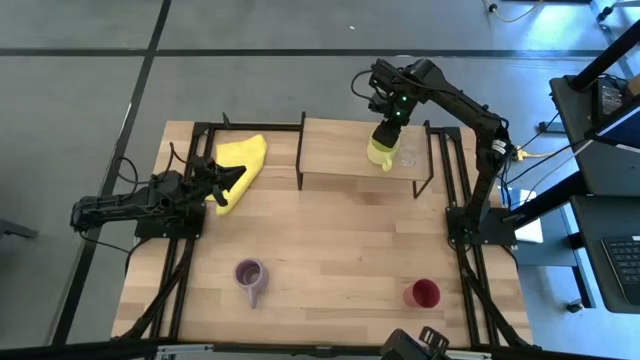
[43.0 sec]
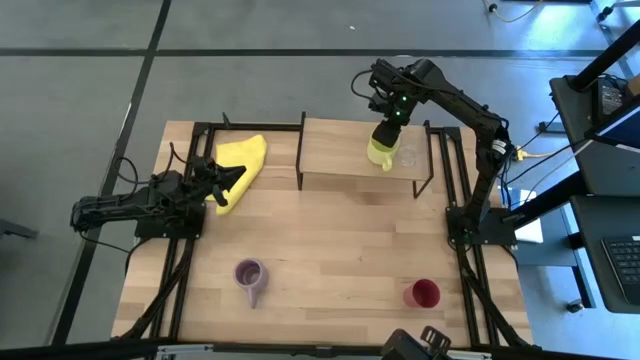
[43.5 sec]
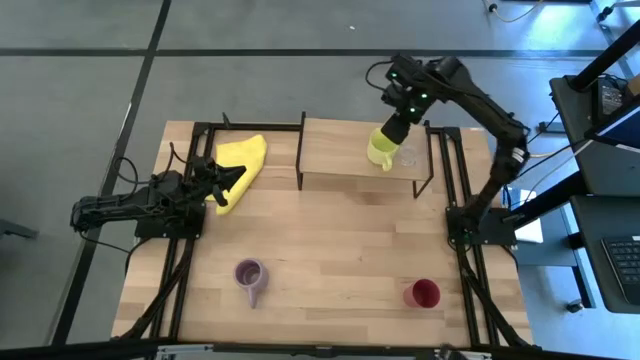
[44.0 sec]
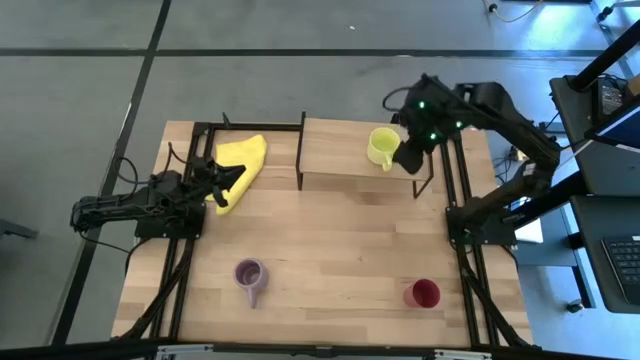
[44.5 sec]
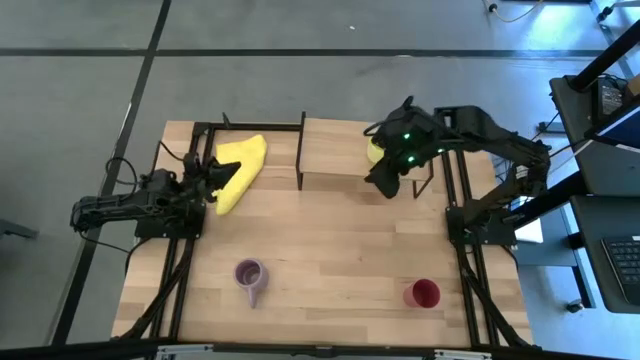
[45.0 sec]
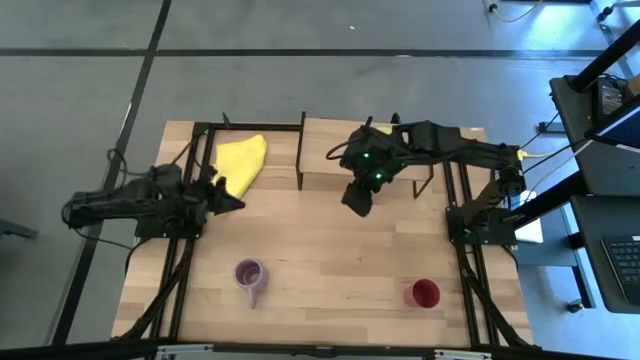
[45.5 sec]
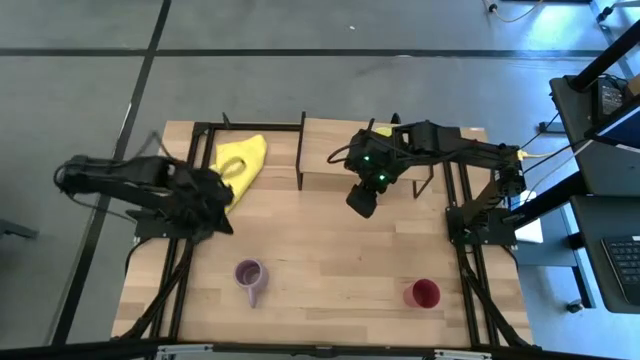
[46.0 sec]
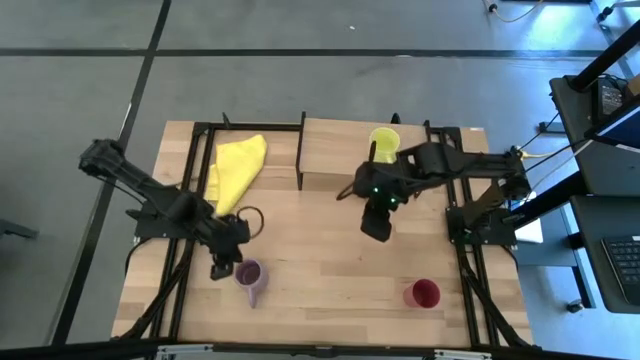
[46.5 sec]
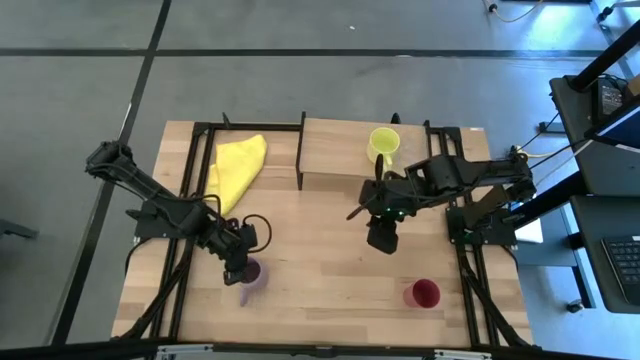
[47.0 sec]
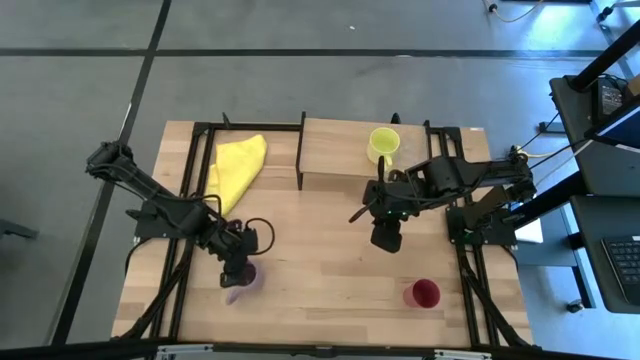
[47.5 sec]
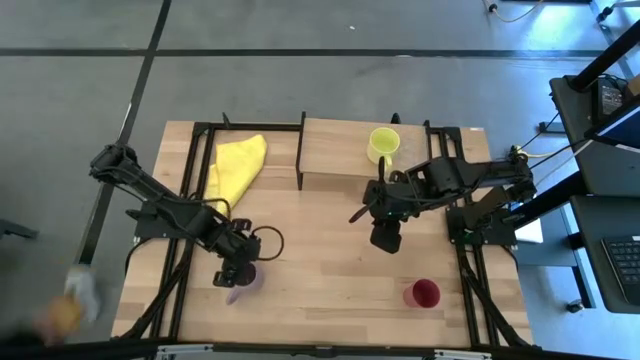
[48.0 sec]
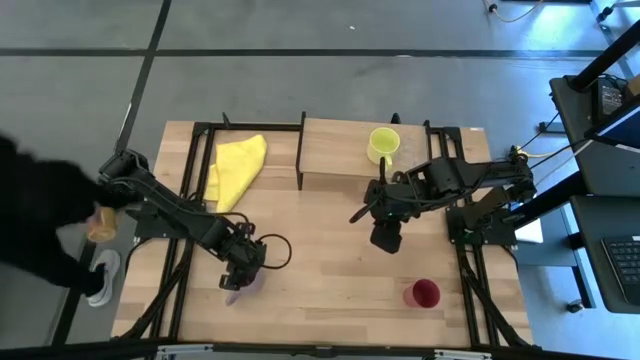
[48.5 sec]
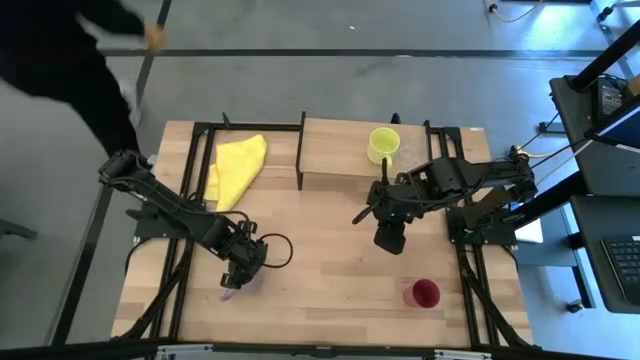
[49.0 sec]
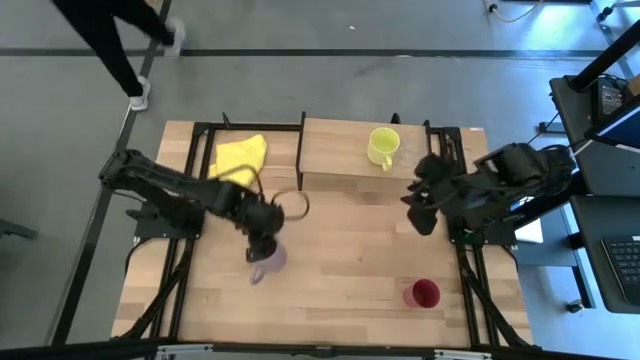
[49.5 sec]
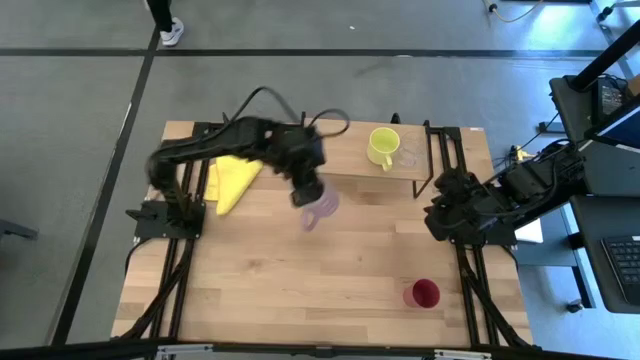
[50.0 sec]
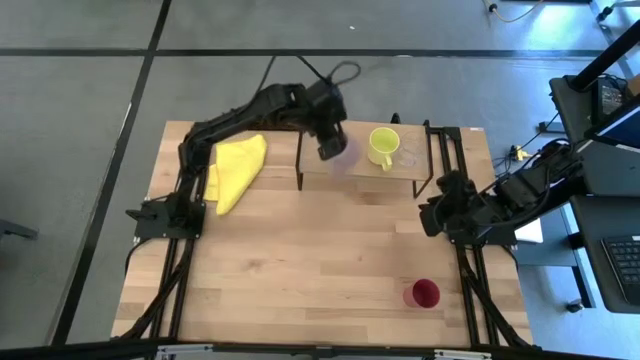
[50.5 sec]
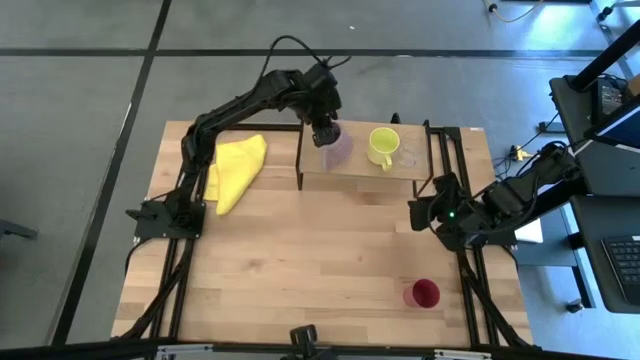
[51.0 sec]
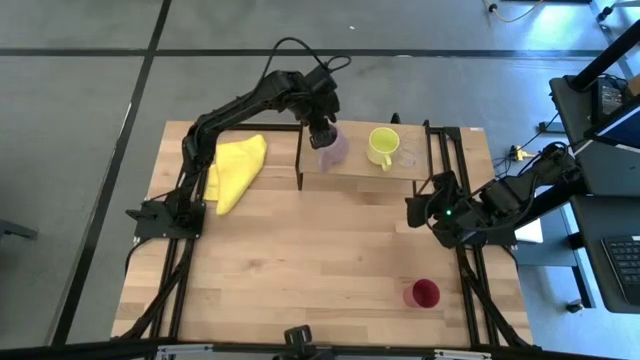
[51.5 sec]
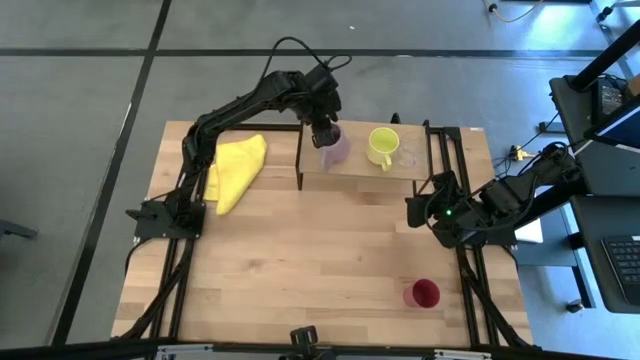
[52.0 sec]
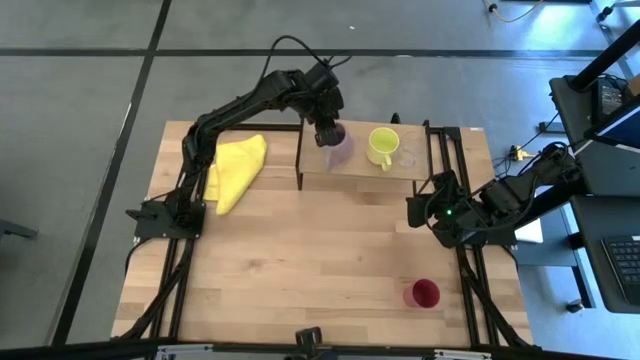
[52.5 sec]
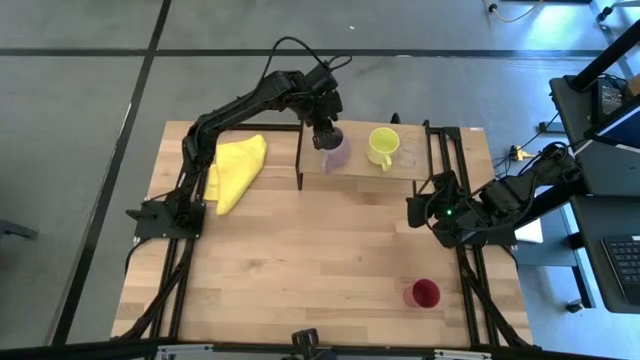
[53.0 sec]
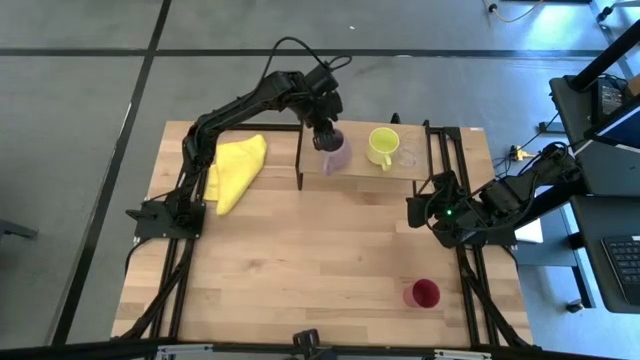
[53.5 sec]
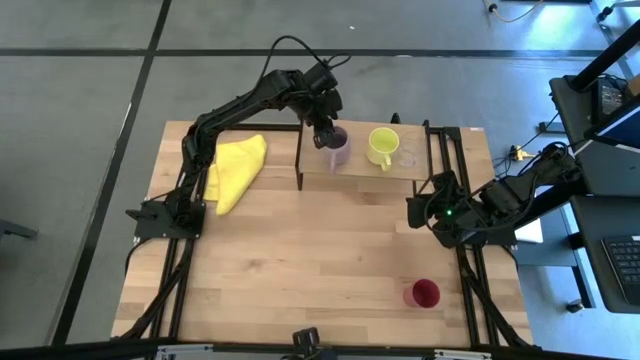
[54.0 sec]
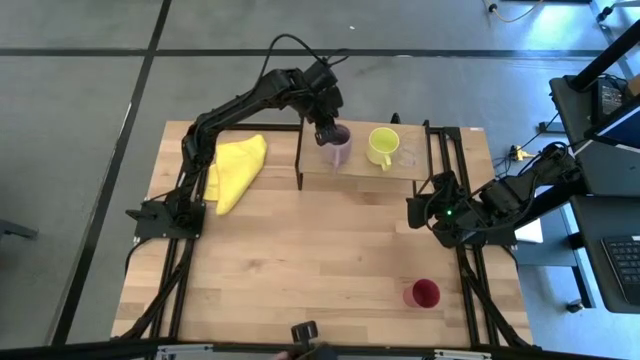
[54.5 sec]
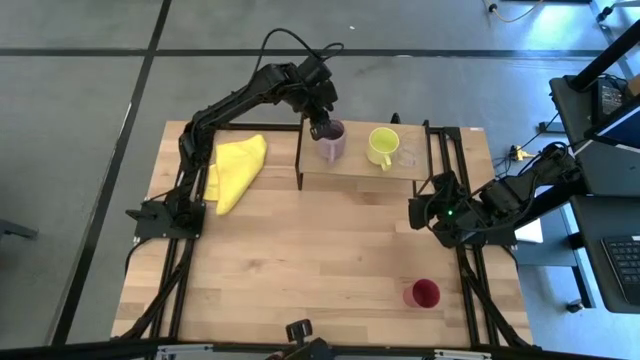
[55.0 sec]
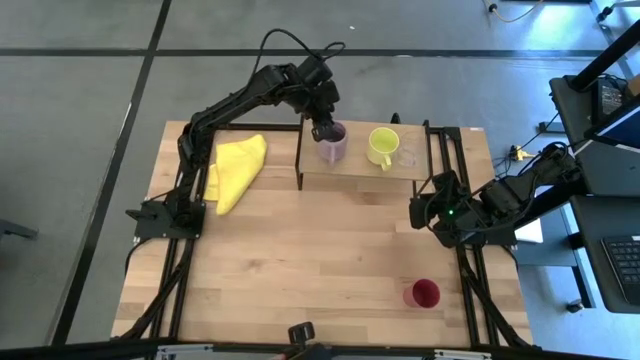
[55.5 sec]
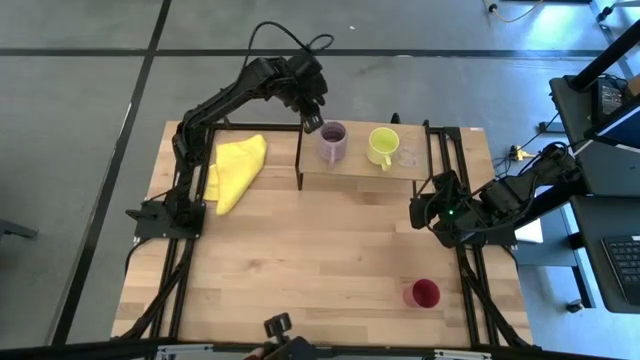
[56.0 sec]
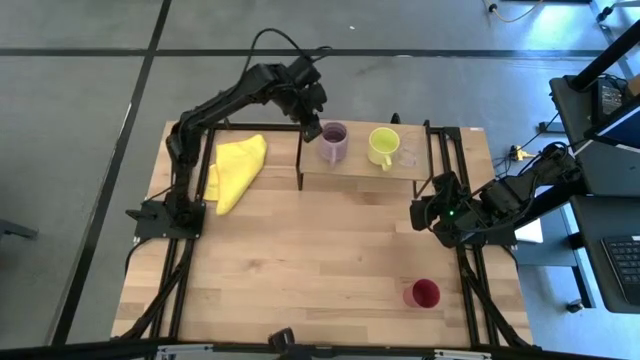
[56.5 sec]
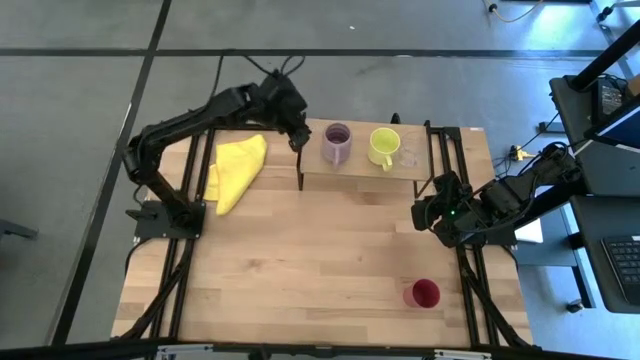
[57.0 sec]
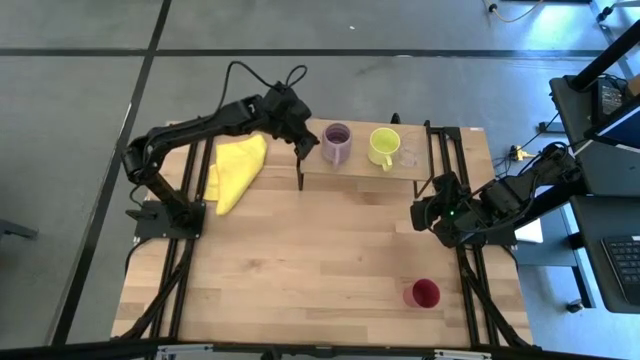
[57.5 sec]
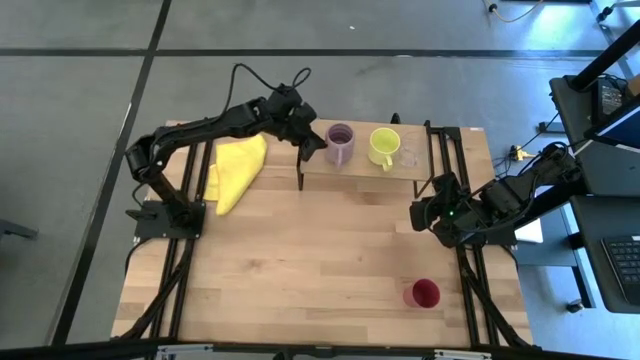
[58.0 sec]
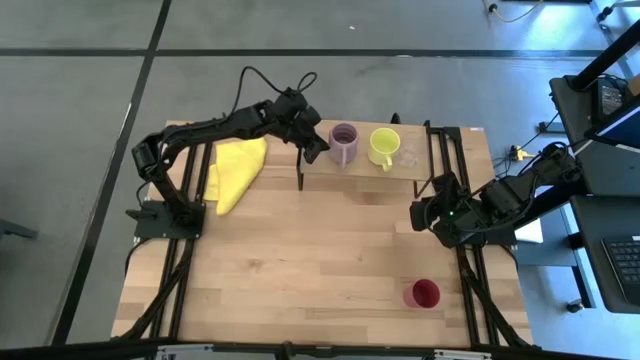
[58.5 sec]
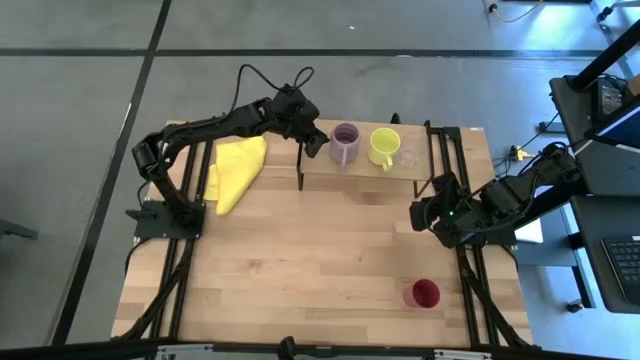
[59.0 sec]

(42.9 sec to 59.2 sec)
Task: Stack small to large cups/mugs on shelf
Put the purple mug on the shelf

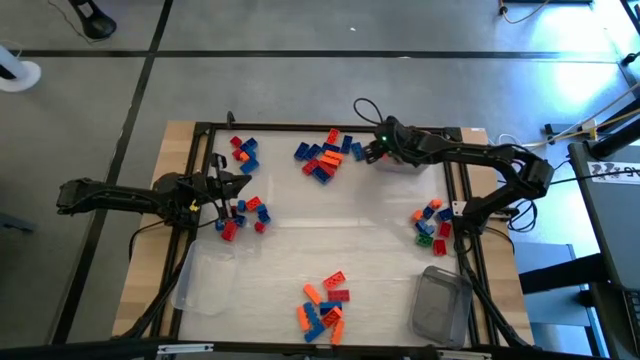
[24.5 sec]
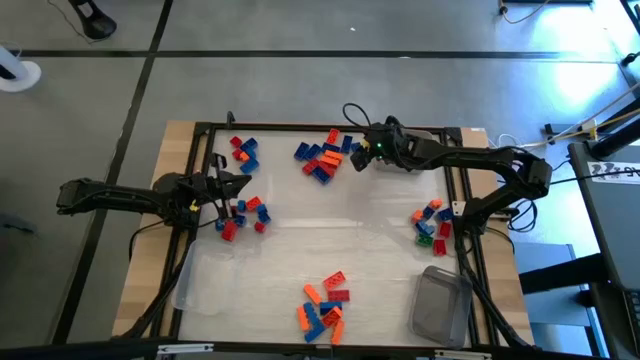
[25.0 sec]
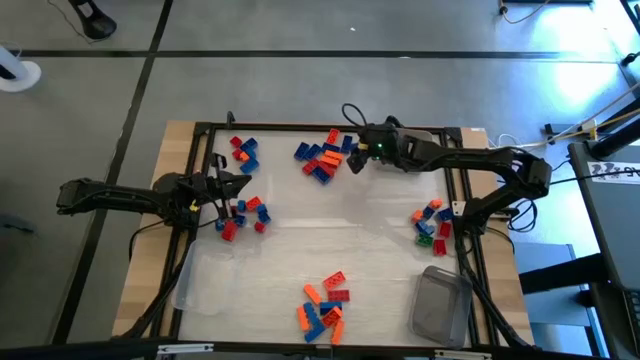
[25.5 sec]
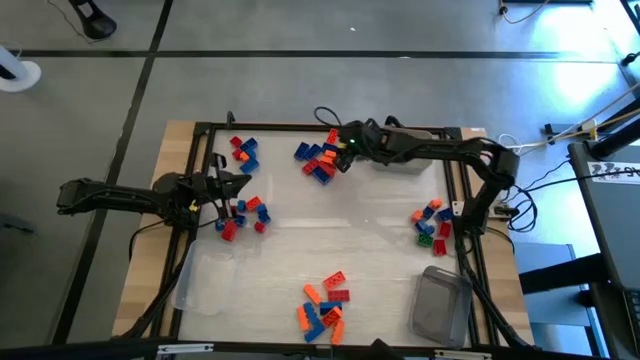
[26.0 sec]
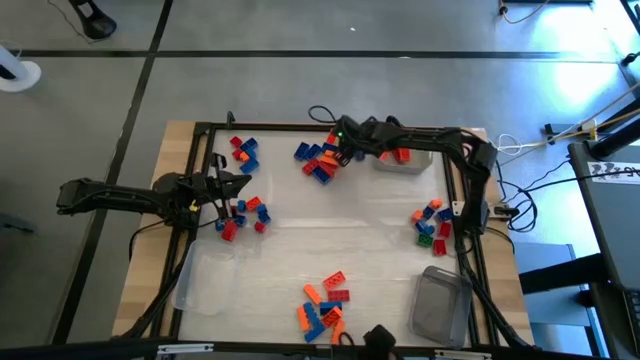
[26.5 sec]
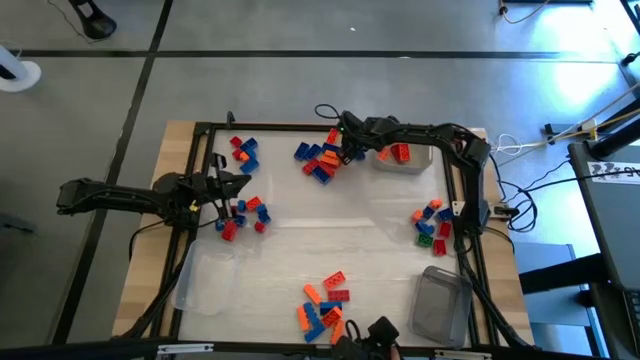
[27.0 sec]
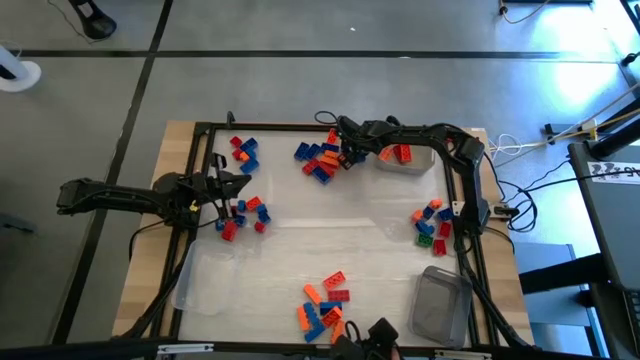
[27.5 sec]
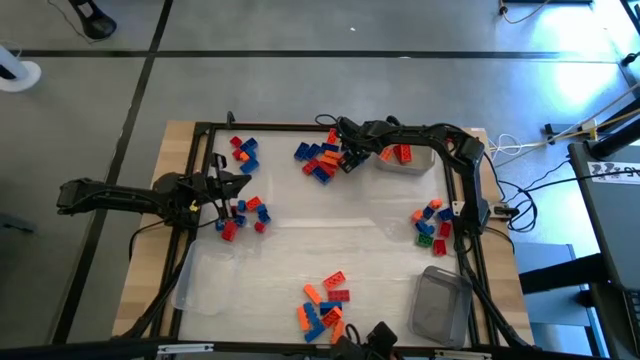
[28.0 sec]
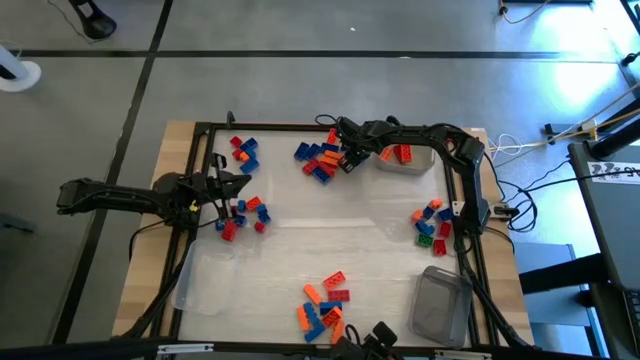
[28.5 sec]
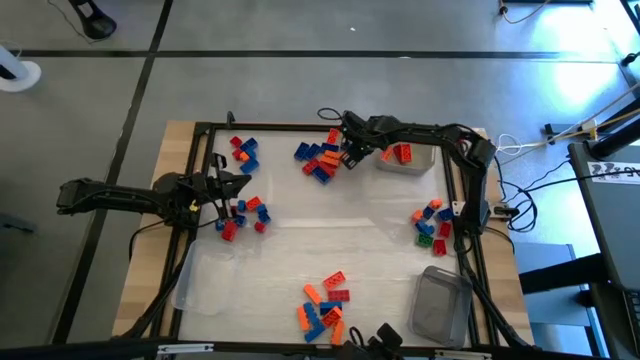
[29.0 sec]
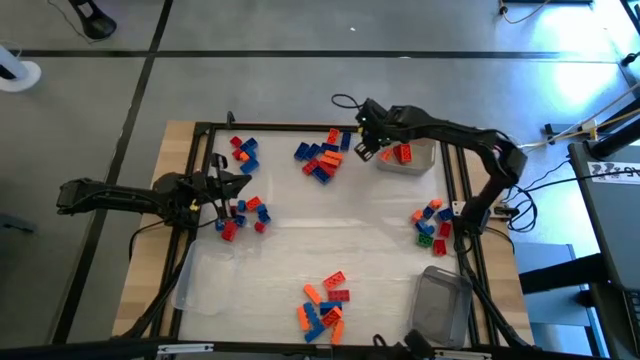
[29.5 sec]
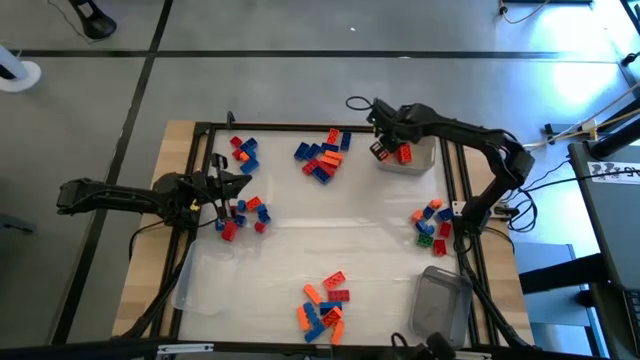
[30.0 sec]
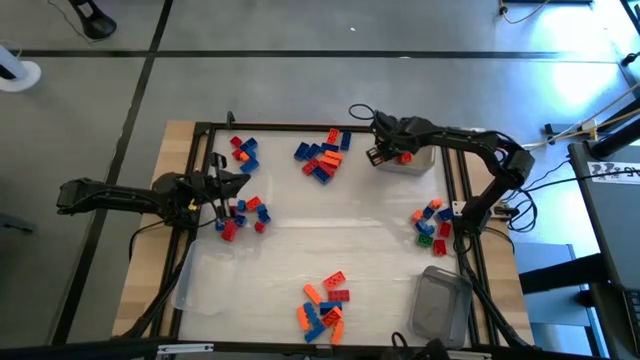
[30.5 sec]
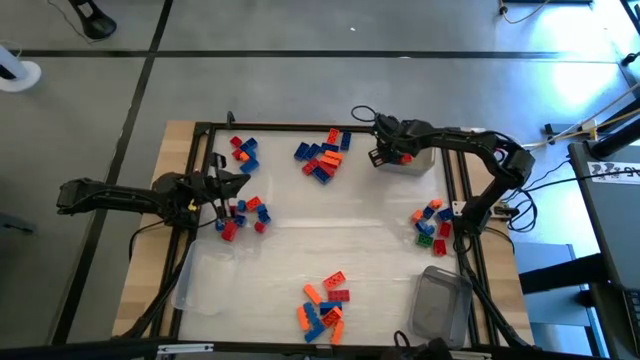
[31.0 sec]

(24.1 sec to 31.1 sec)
Task: Sort blocks by size
Put the blue game piece into the gray bin
